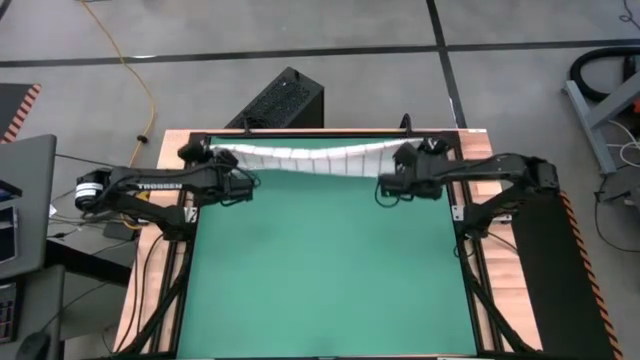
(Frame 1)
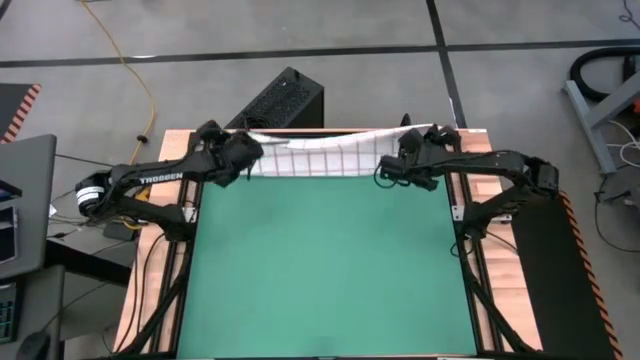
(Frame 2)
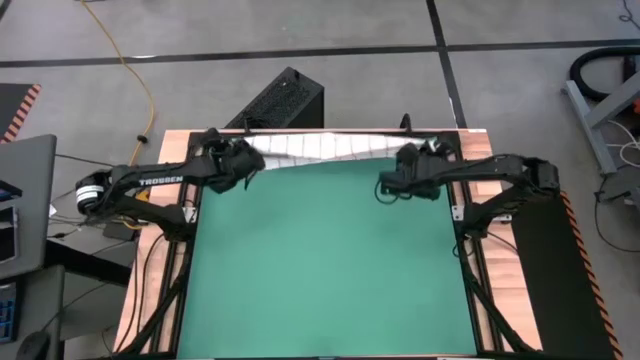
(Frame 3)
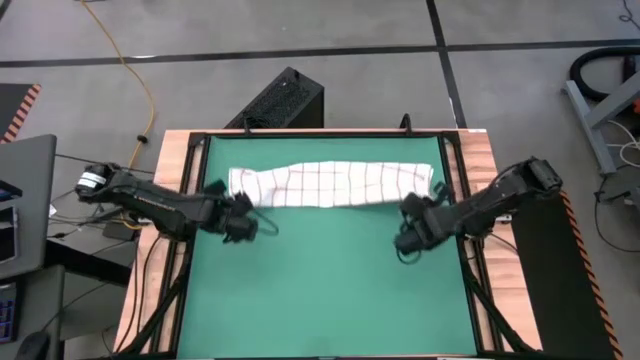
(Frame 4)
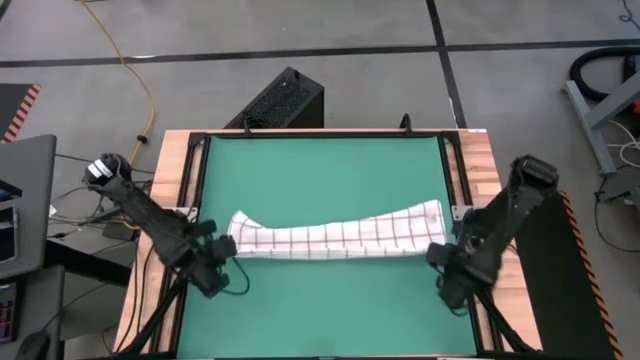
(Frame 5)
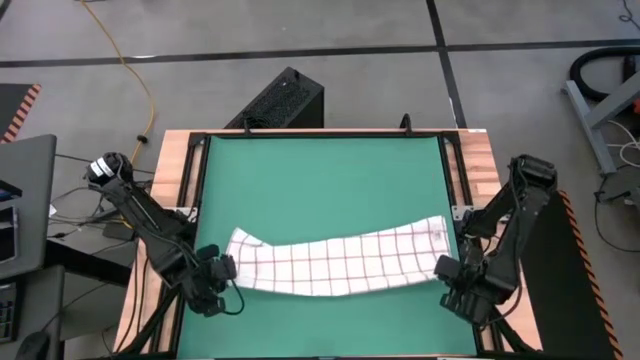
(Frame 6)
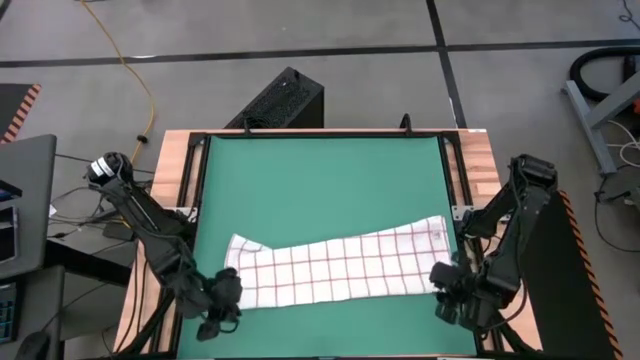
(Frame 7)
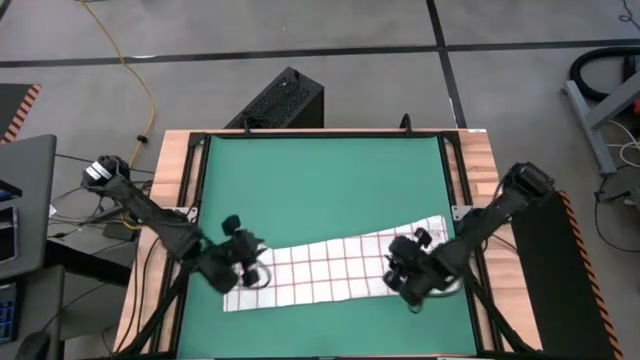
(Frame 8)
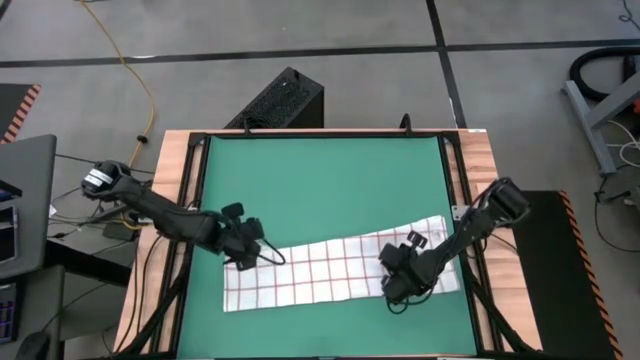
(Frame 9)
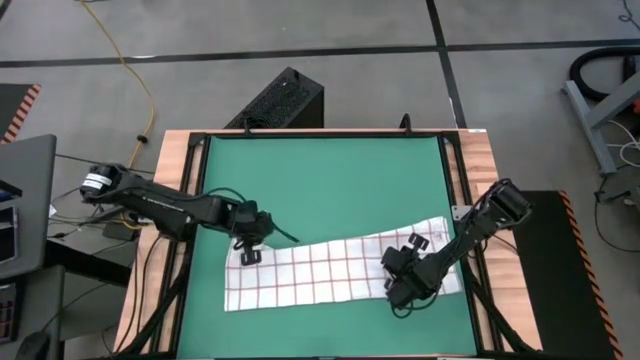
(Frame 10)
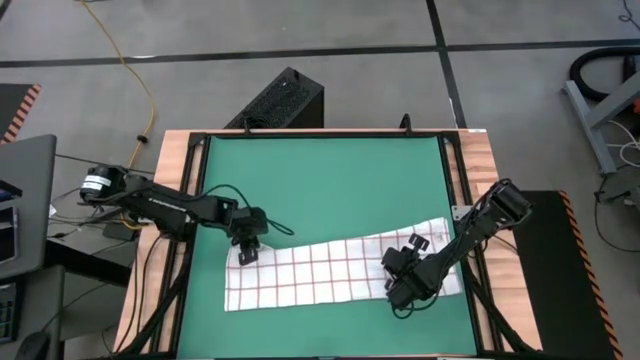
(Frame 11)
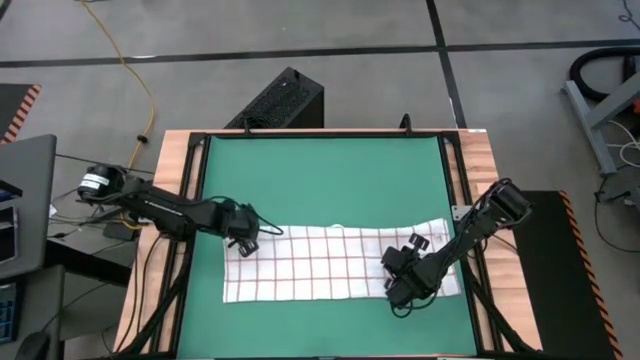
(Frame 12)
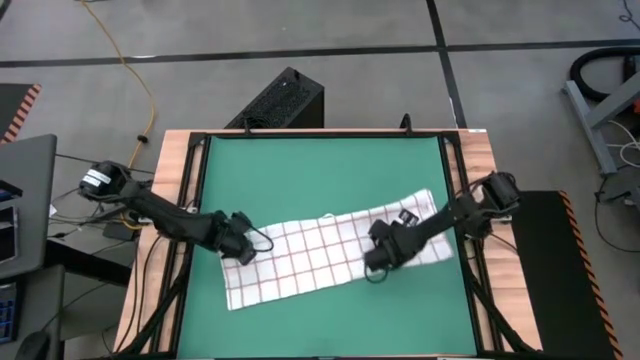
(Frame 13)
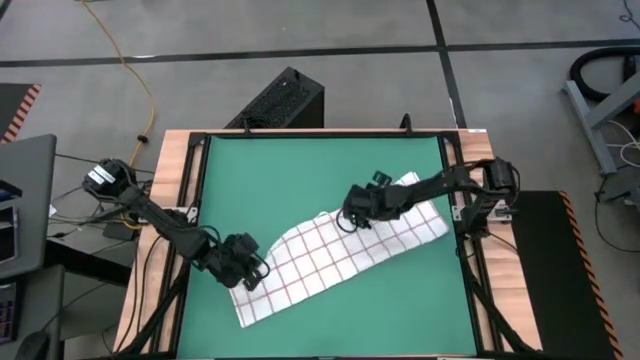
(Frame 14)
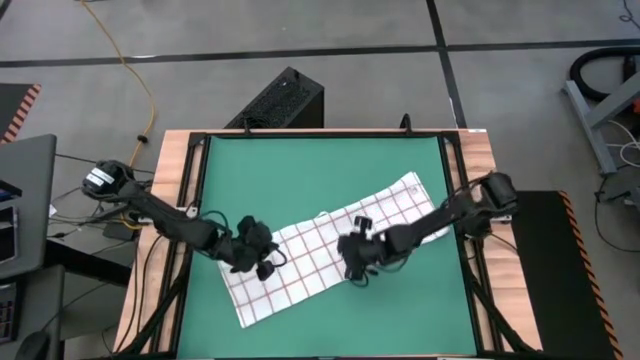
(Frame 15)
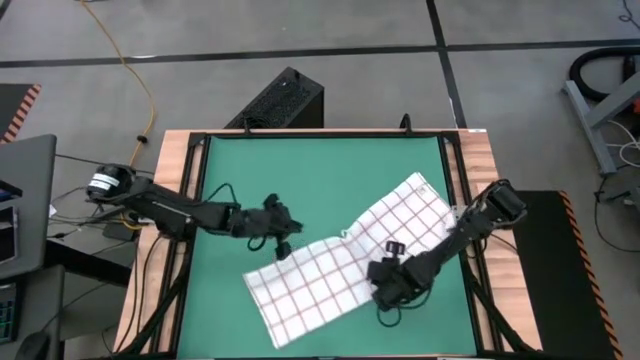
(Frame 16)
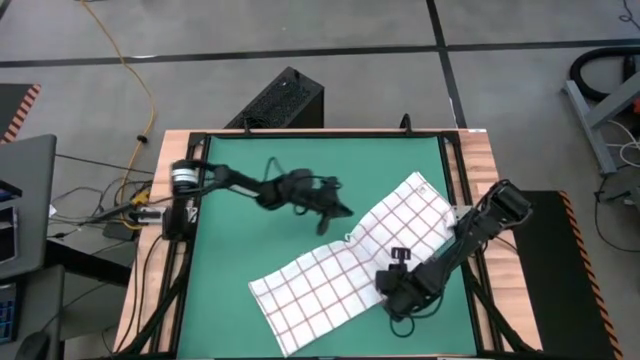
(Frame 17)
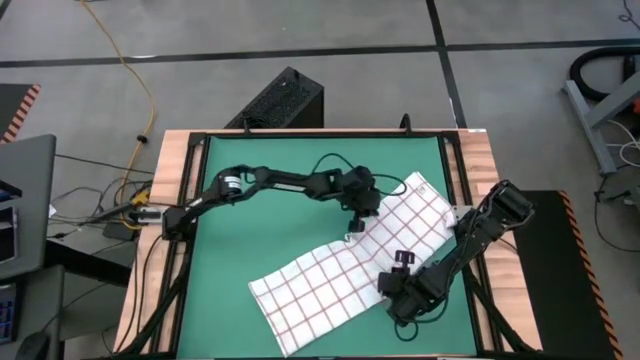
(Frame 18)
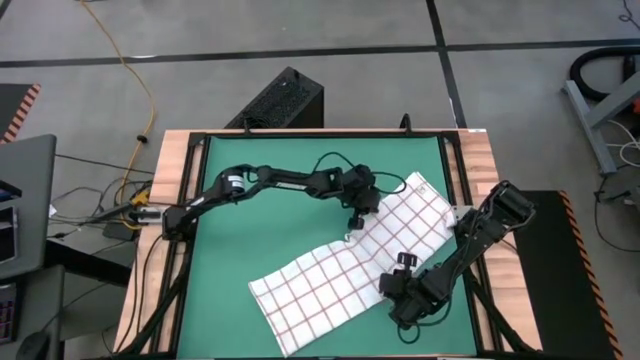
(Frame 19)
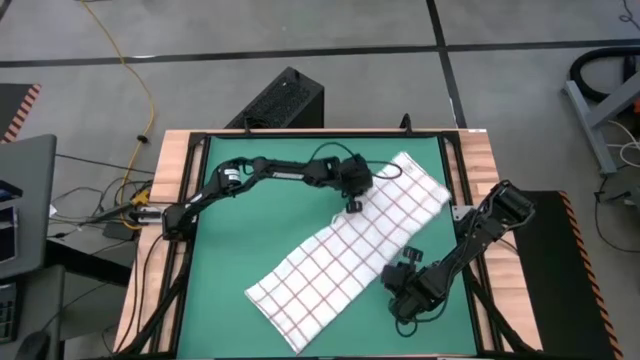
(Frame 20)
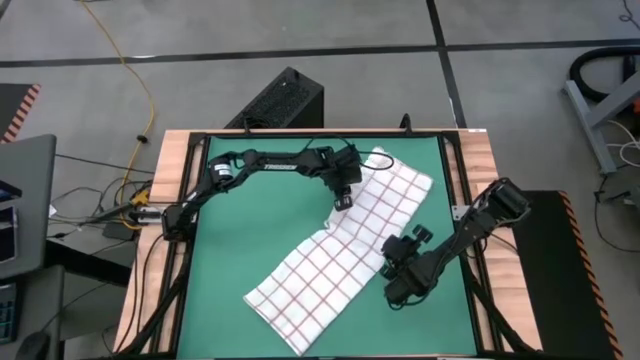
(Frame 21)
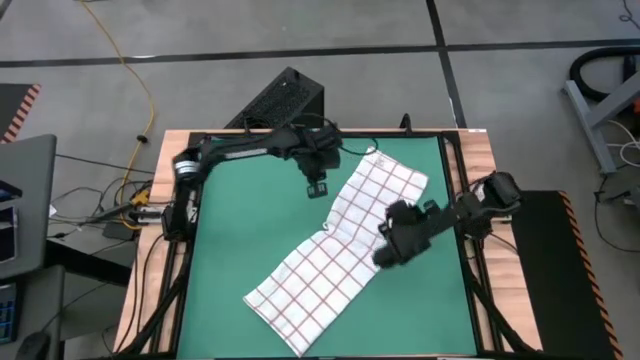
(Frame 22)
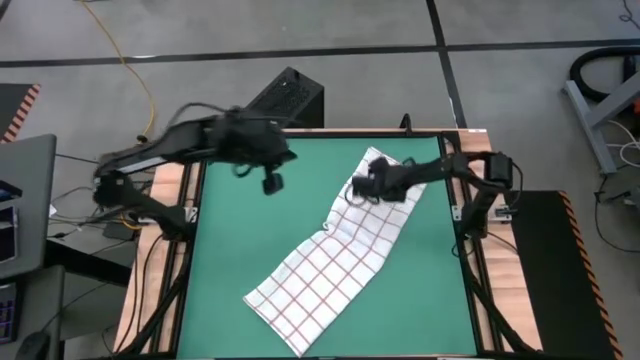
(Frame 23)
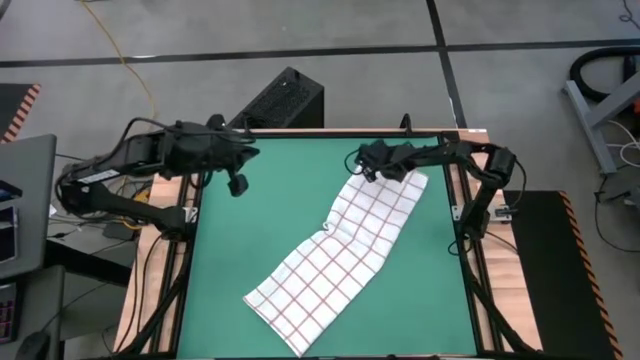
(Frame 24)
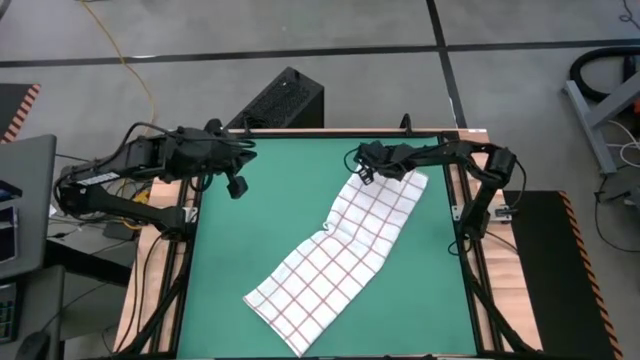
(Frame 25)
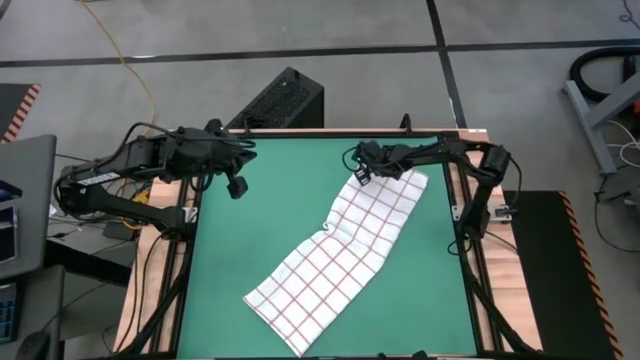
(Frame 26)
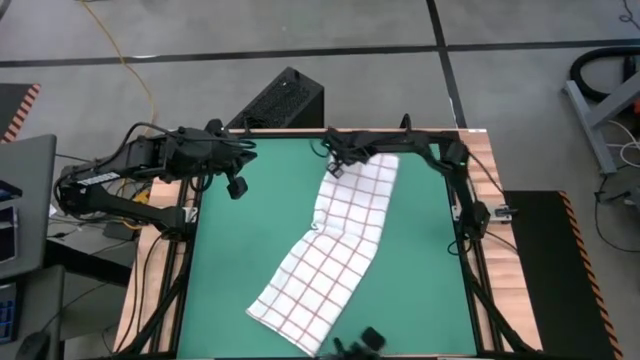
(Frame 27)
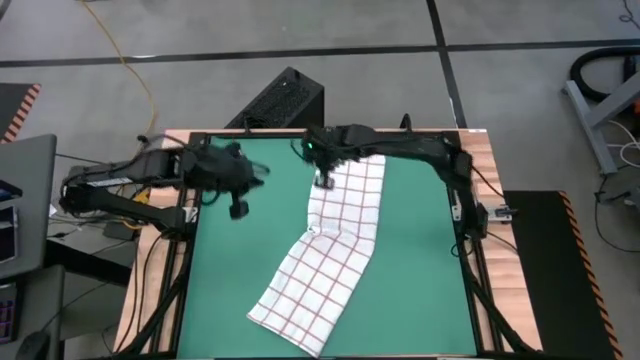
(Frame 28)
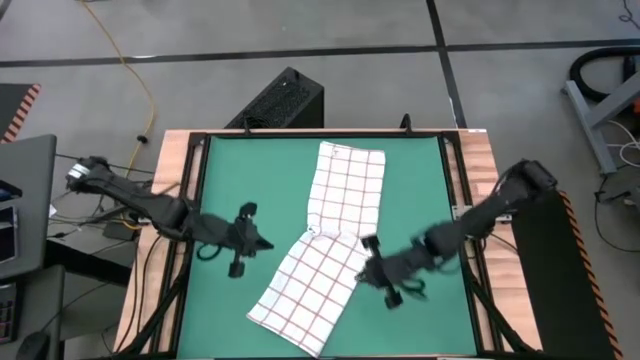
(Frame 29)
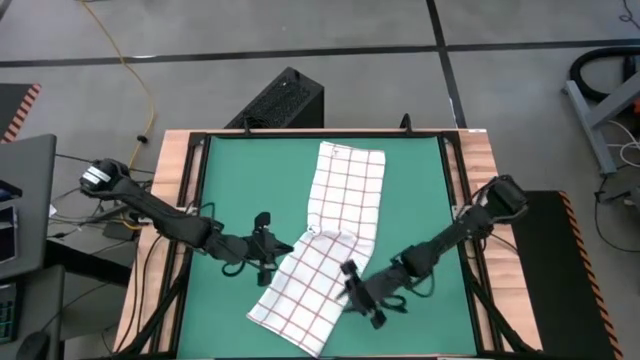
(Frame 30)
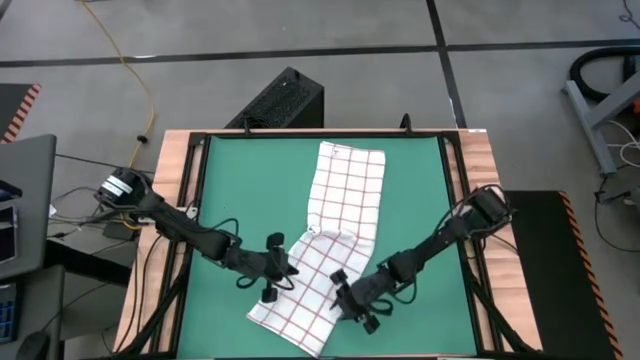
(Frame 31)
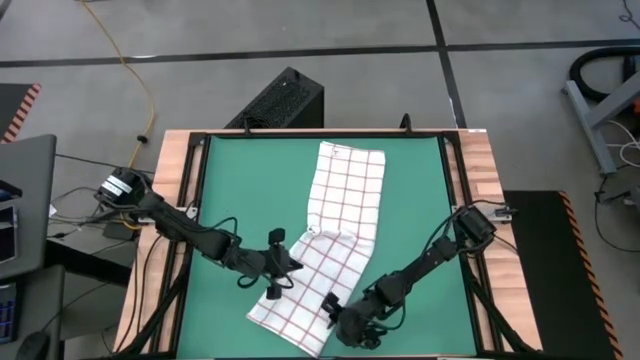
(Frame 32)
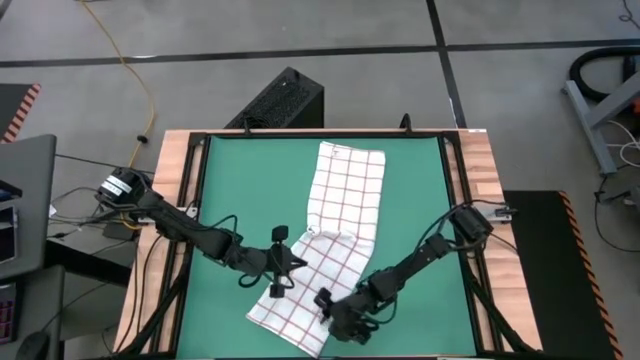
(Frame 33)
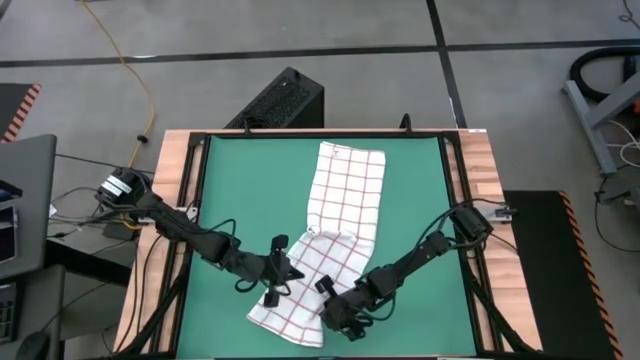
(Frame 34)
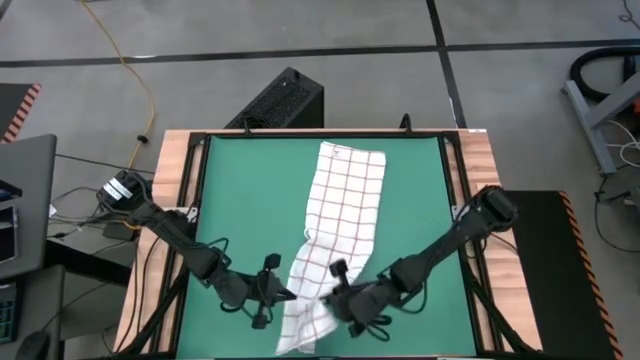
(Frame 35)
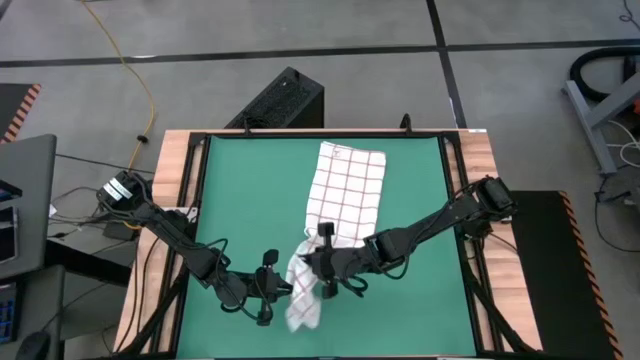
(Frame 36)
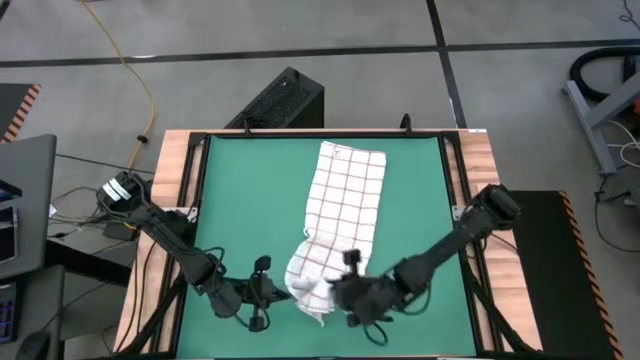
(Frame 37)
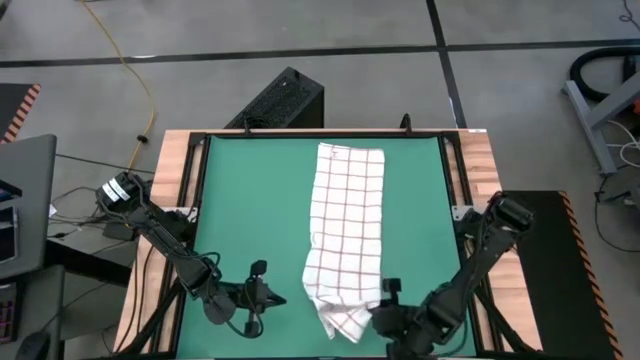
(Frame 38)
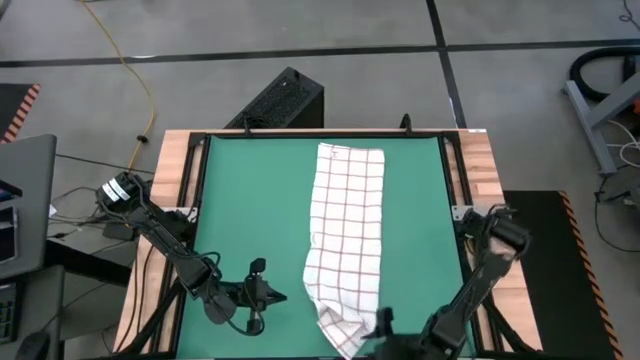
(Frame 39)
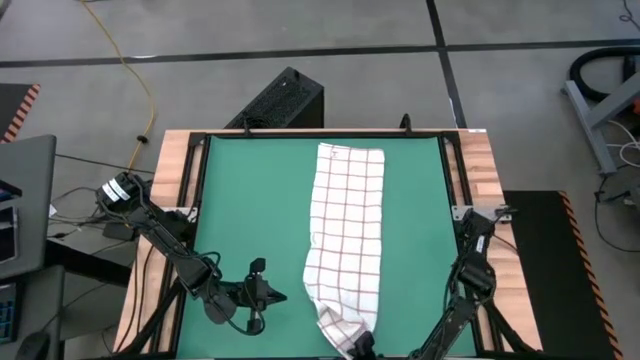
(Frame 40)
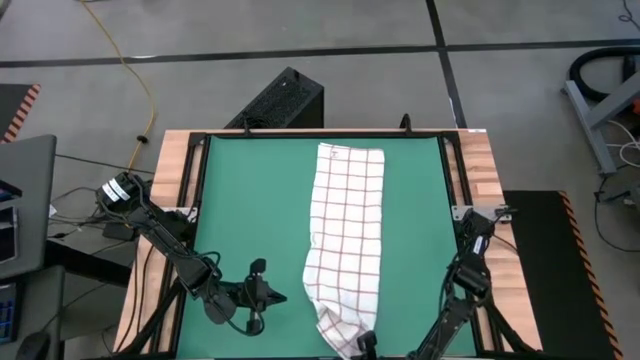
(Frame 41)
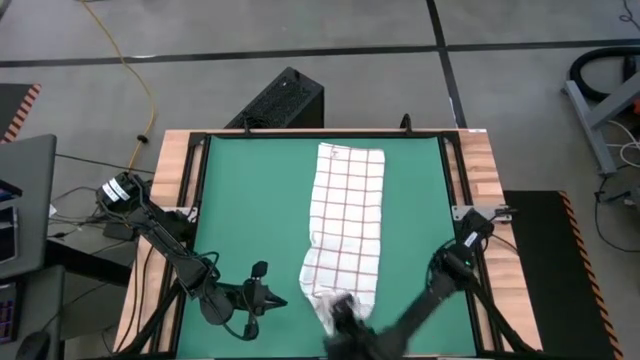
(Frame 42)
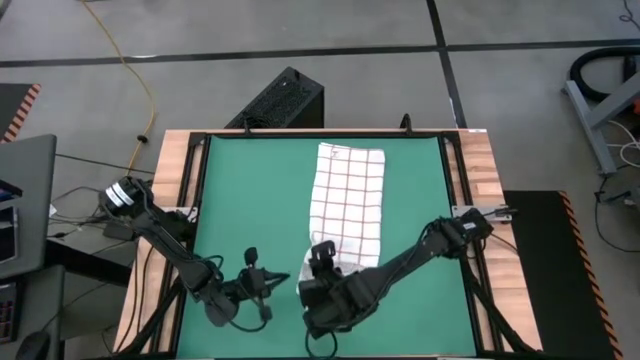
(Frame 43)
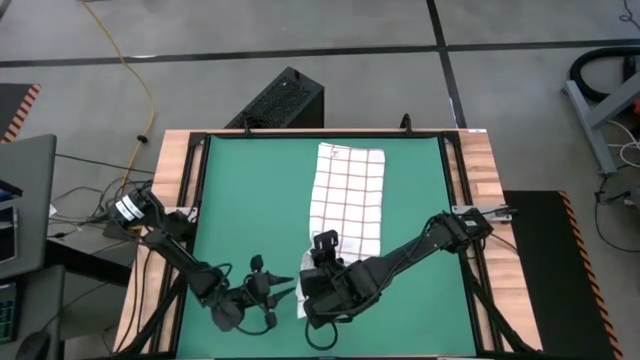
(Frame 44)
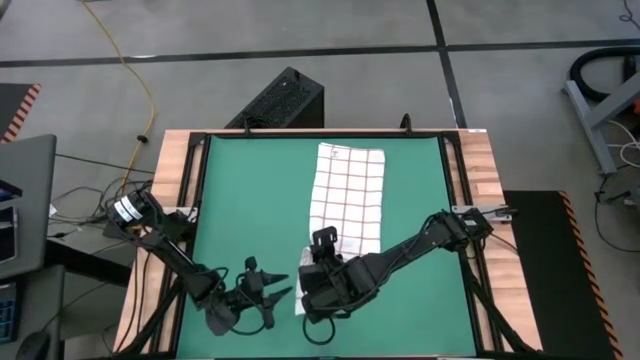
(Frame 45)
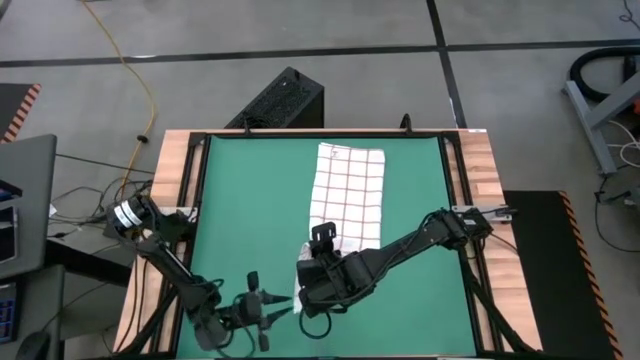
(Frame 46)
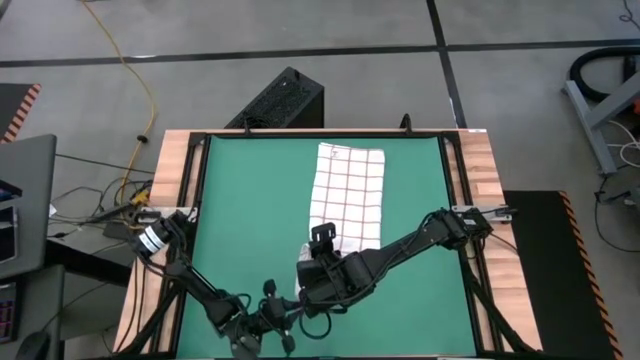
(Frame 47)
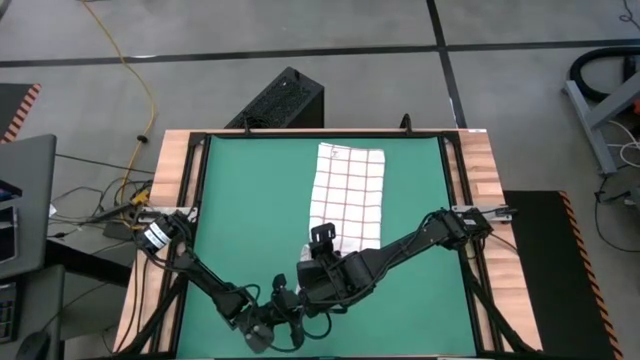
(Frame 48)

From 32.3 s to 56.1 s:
Task: Roll towel
Roll the white towel
